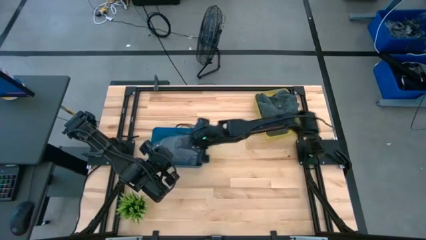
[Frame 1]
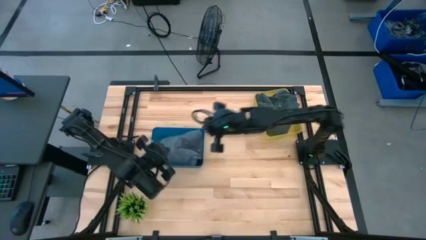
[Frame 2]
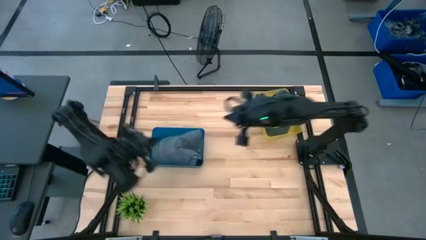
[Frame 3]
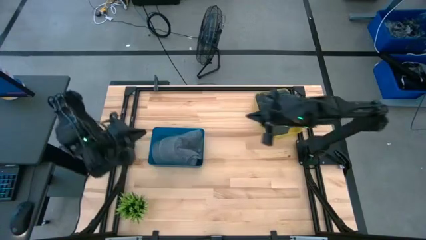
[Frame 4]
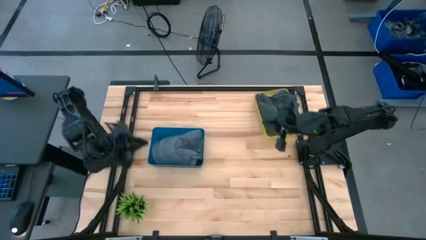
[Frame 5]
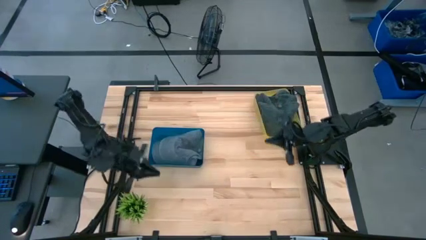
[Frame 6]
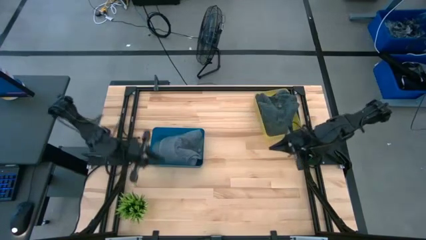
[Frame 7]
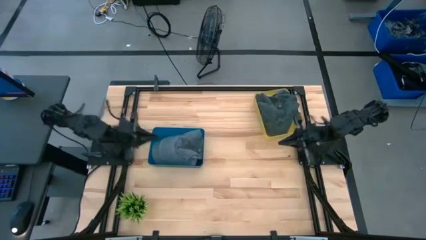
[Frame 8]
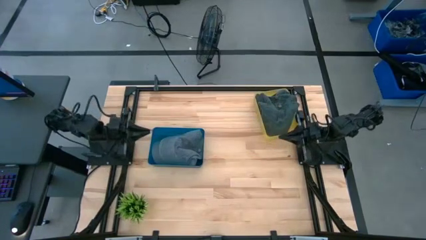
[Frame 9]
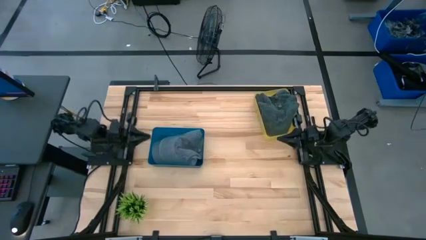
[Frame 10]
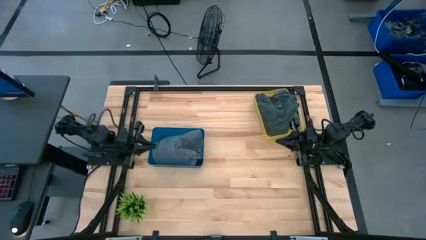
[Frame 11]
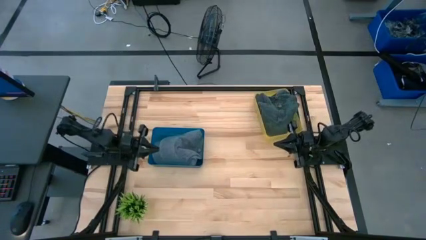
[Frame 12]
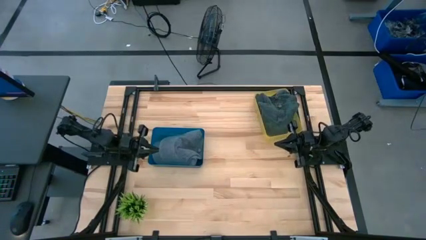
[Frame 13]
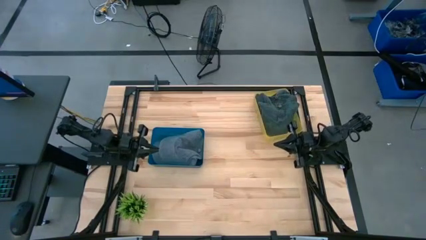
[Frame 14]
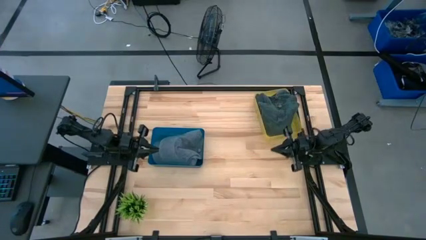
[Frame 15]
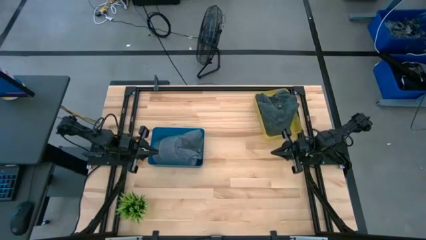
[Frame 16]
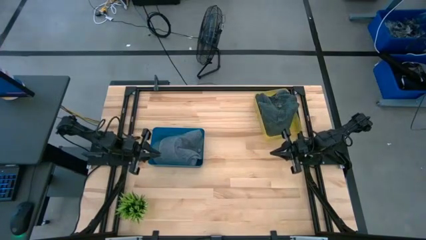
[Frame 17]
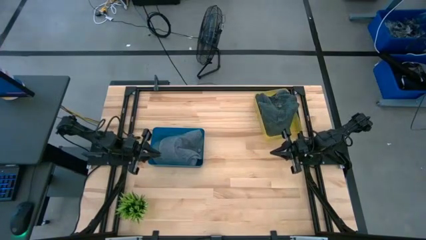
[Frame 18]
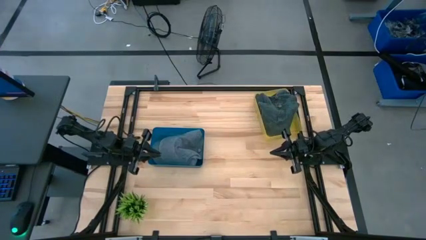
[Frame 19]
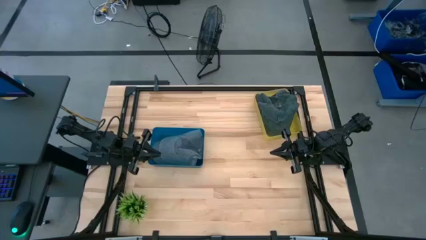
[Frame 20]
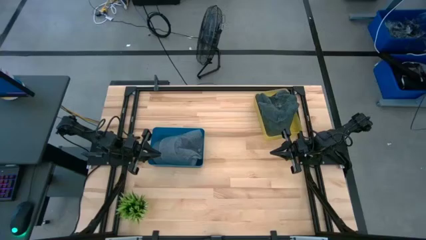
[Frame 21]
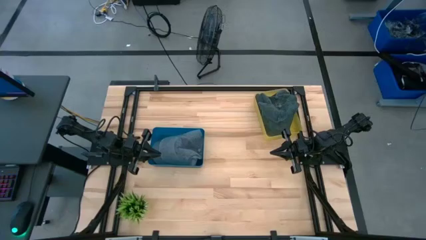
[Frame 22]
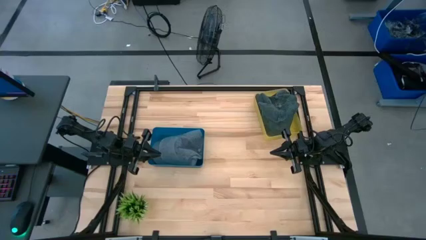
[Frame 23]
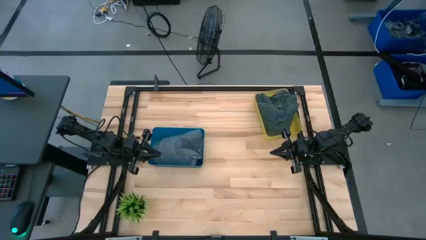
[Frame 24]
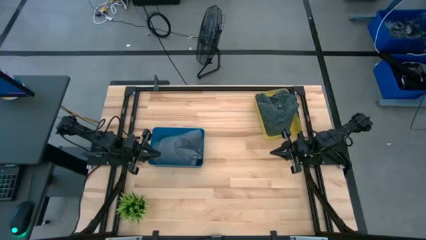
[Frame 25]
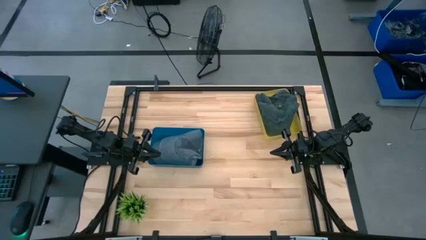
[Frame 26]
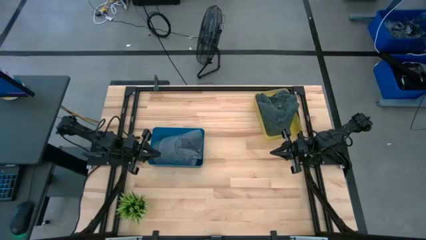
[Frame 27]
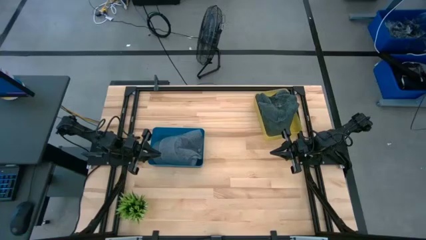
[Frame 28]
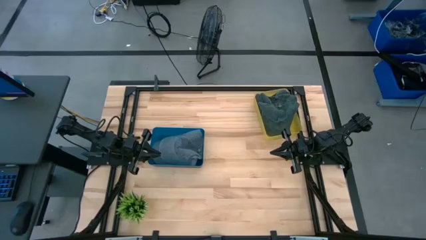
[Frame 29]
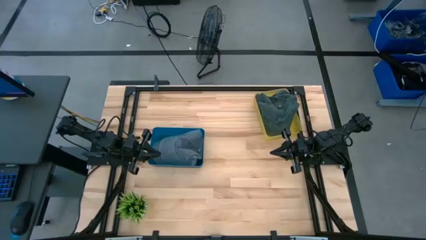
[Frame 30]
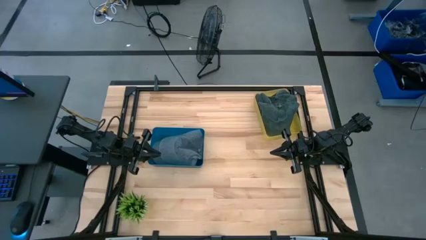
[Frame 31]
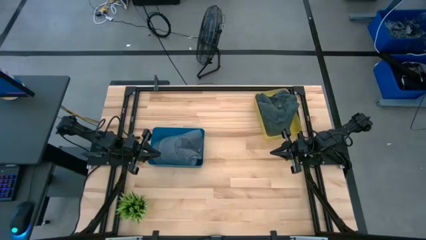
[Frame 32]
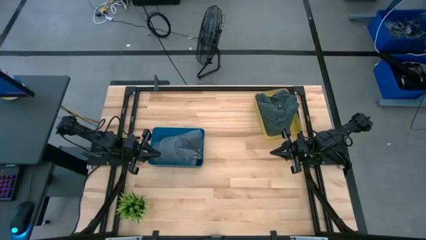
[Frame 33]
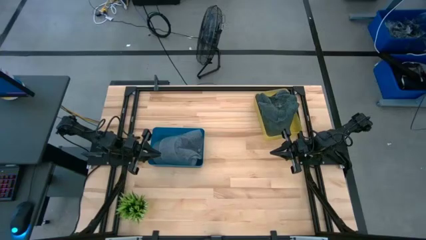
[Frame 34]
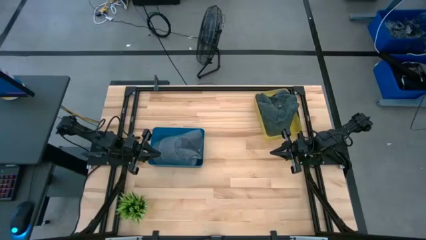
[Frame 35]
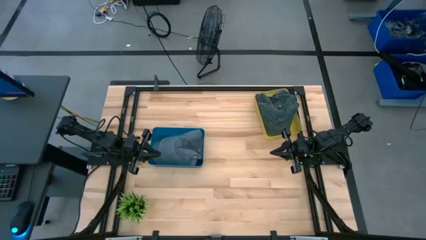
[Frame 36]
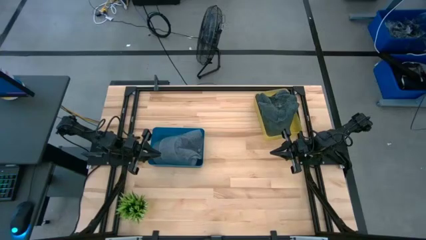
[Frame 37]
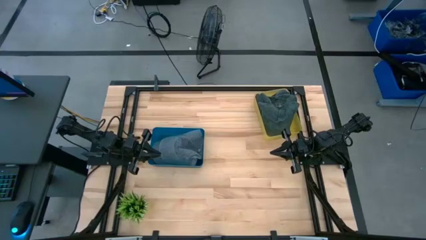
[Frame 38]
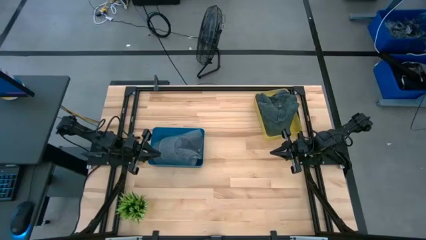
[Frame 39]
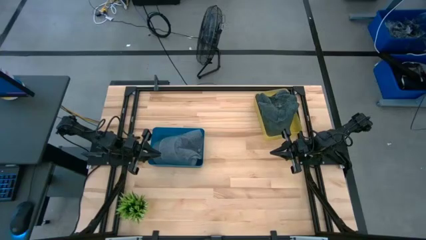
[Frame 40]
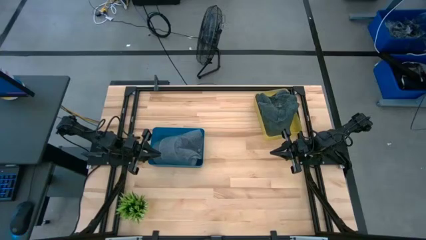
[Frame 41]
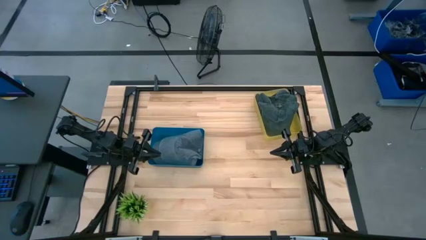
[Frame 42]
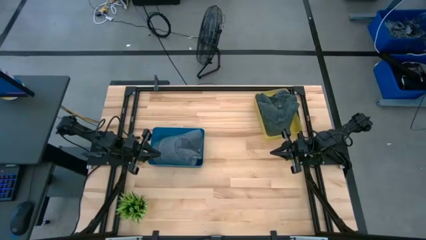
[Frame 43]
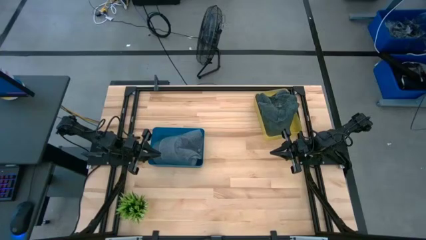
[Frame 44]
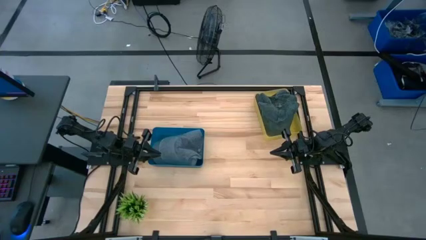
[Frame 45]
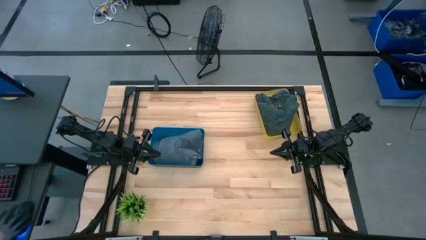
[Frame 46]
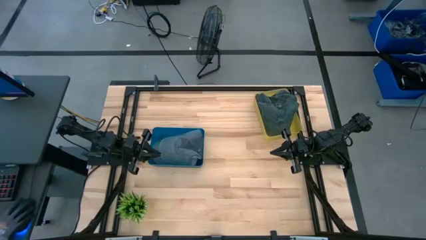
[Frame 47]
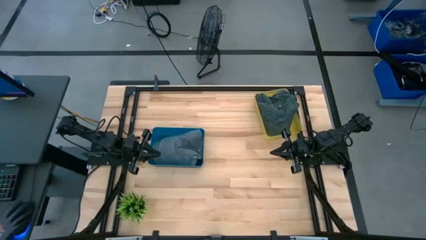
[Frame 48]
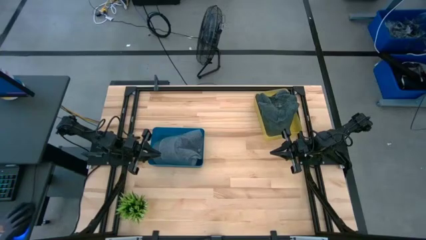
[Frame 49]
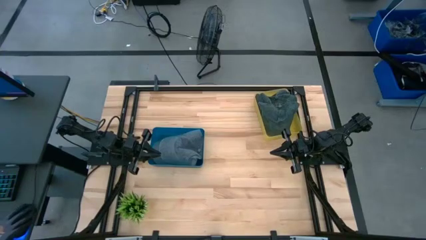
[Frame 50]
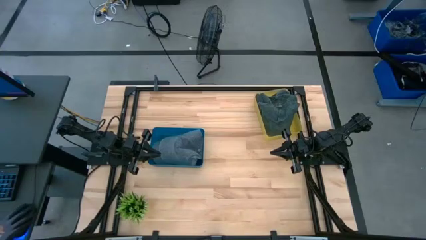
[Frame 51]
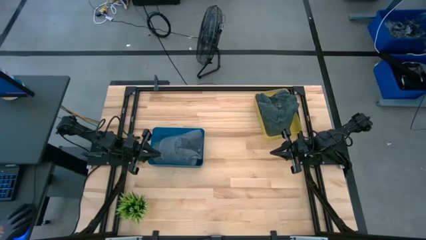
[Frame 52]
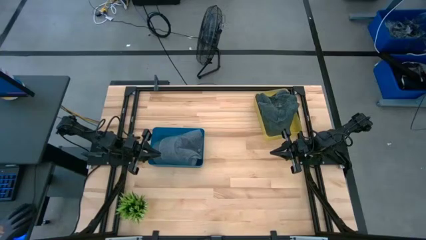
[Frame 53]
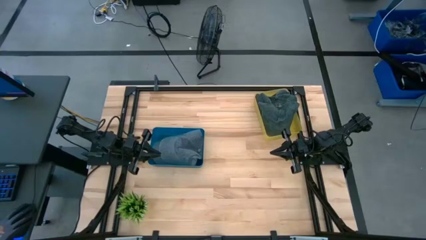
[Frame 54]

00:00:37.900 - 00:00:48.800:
Task: Pick & Place hat
Return to Home Position

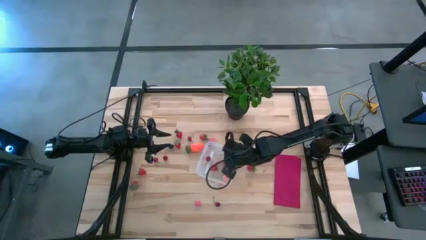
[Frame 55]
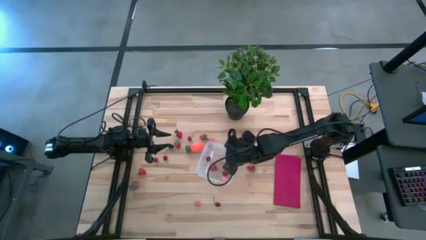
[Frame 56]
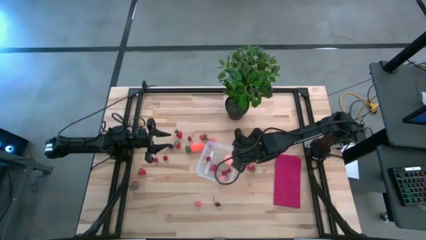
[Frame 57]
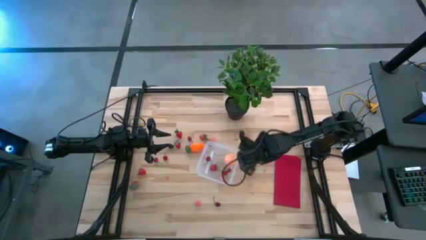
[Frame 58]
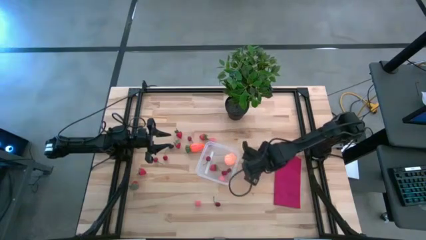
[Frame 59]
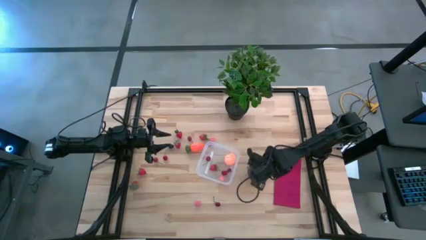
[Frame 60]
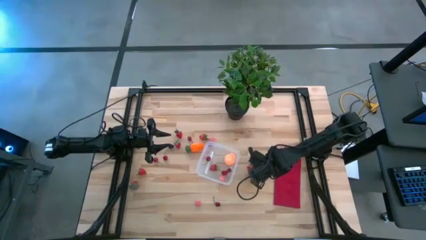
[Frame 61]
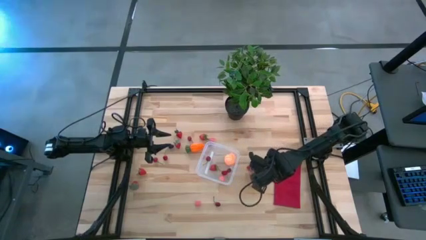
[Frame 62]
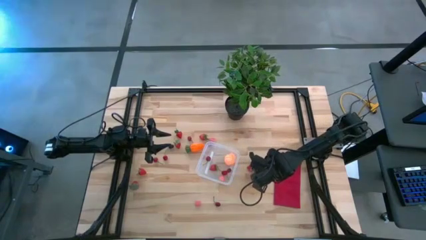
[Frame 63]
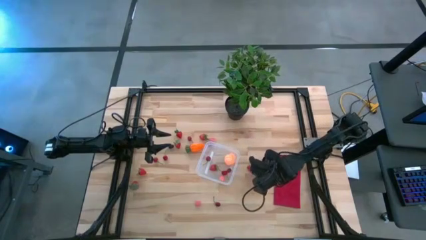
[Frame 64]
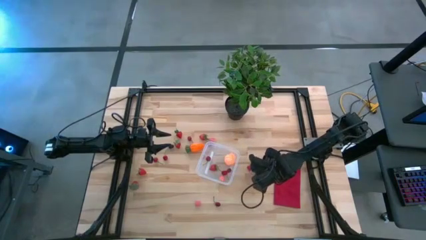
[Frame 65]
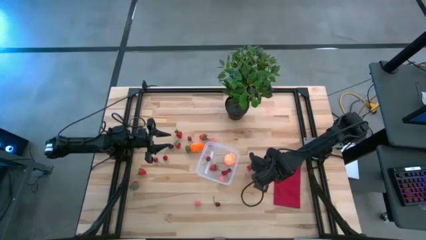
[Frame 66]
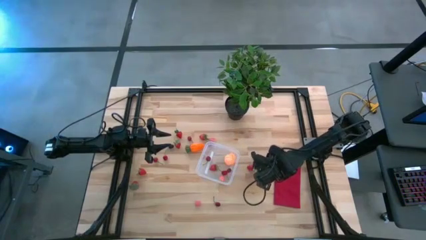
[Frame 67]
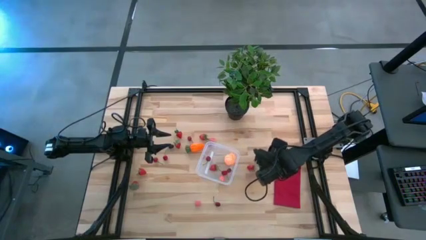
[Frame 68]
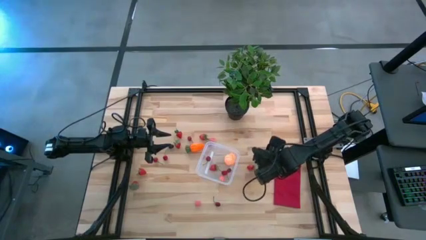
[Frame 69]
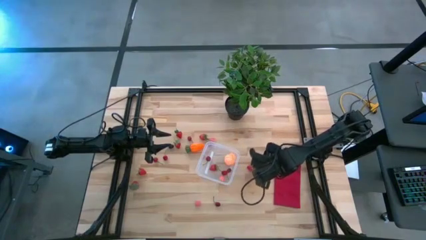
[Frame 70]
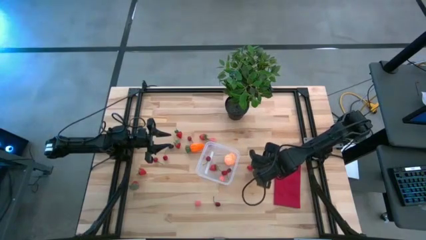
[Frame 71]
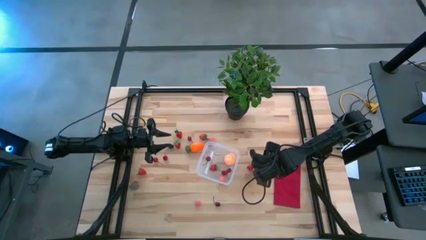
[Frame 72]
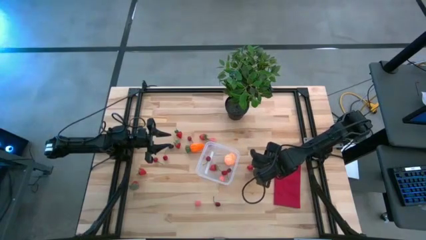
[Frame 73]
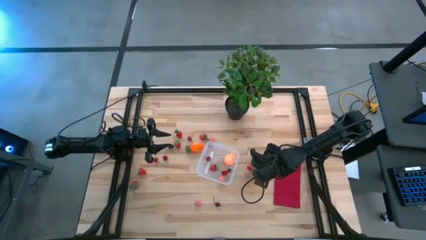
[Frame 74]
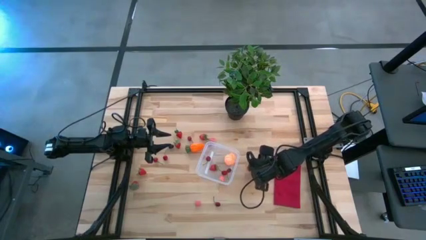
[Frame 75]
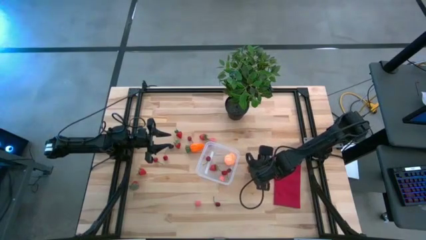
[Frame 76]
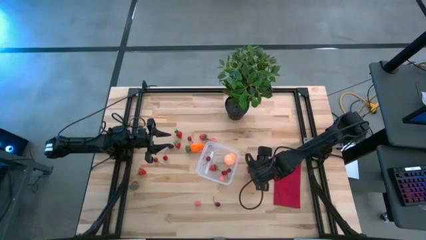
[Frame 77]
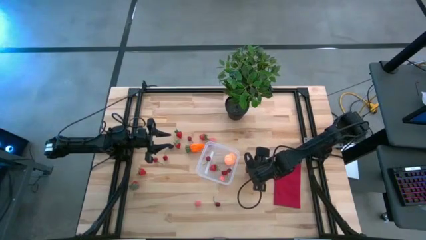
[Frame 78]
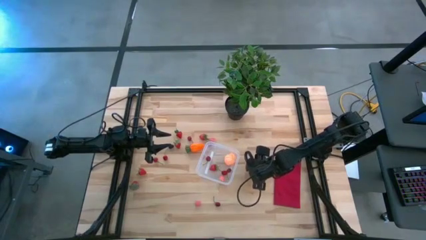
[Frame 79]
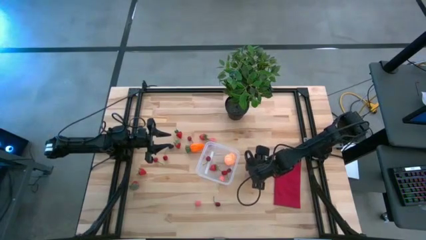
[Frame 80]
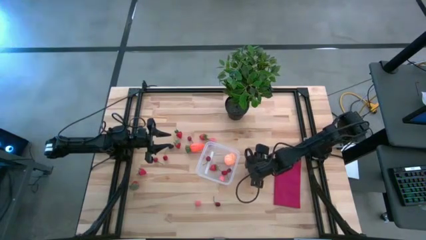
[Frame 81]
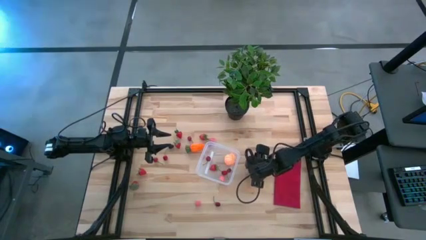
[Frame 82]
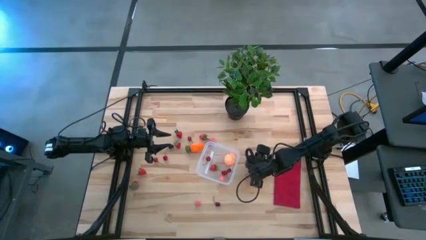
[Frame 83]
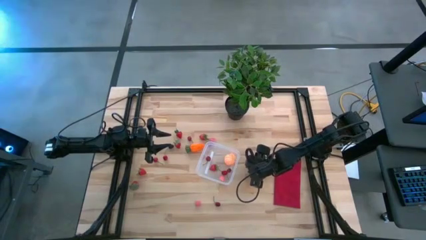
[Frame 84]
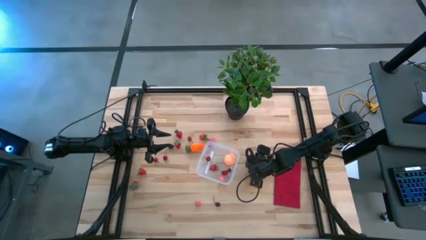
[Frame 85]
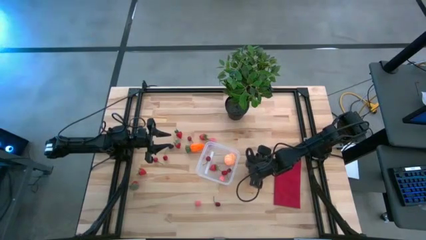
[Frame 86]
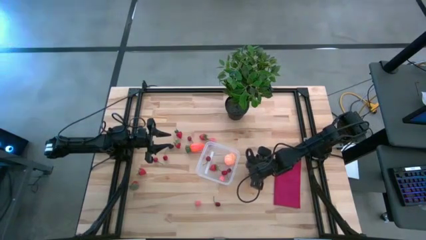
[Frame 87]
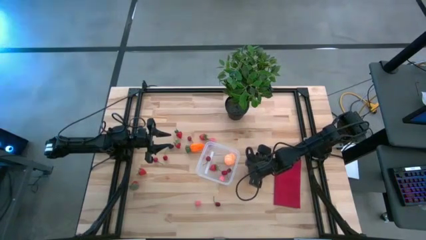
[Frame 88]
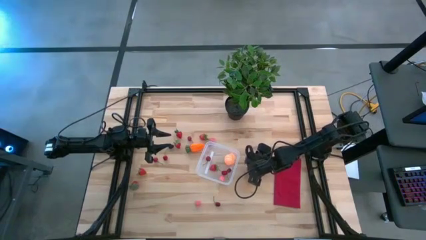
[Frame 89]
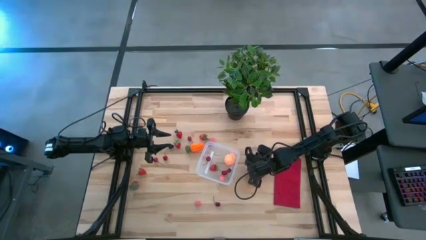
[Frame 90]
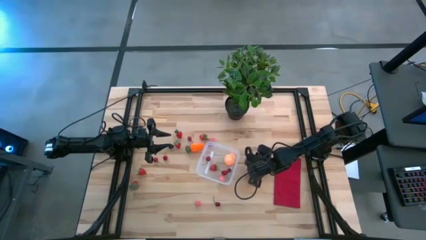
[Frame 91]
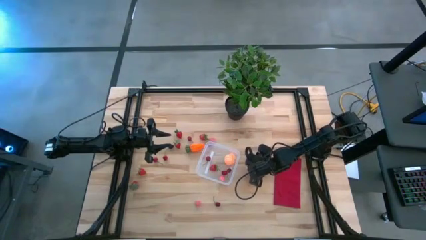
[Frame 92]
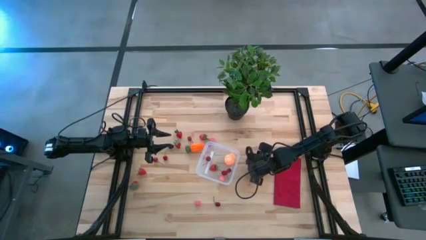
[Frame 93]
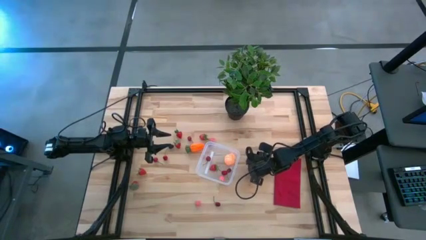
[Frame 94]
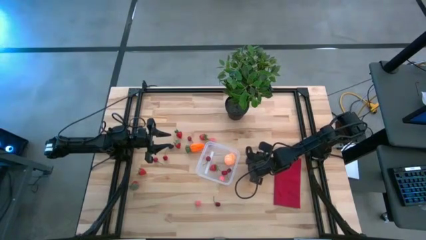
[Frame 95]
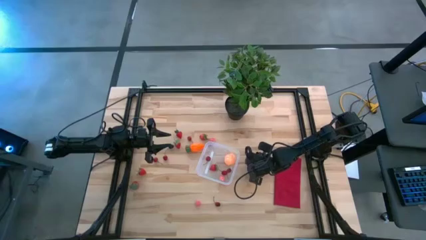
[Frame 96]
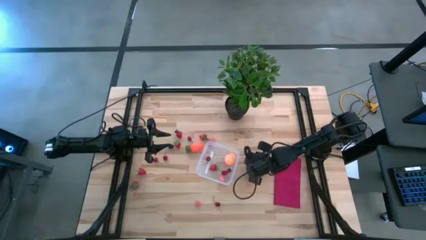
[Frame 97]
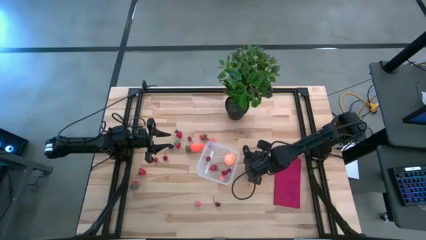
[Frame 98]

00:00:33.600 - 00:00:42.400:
Task: Pick and placing Produce into tupperware
Put the red strawberry into the transparent bin
